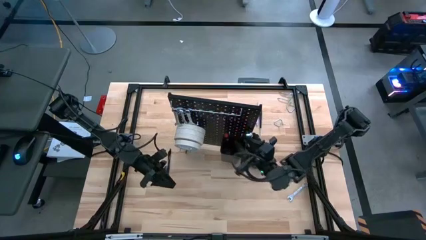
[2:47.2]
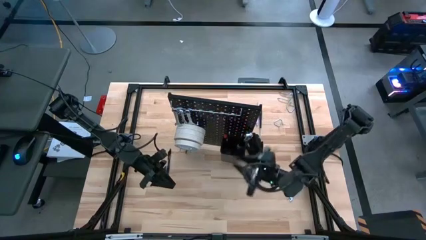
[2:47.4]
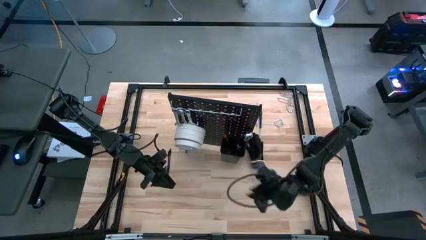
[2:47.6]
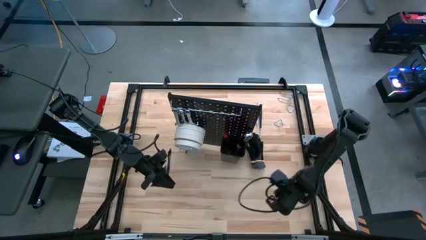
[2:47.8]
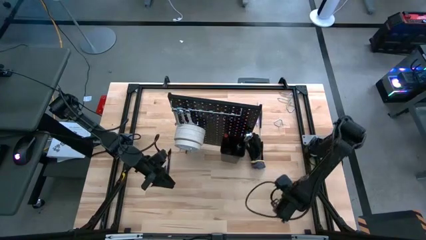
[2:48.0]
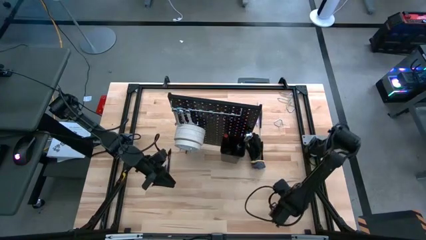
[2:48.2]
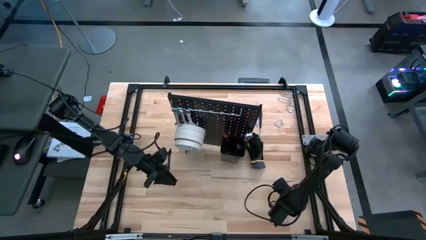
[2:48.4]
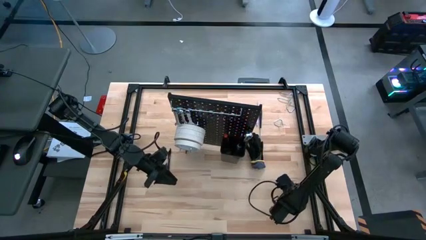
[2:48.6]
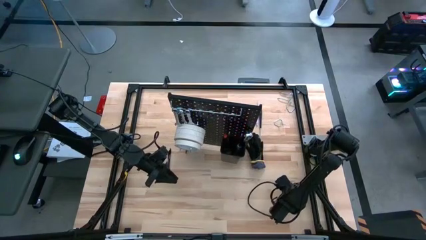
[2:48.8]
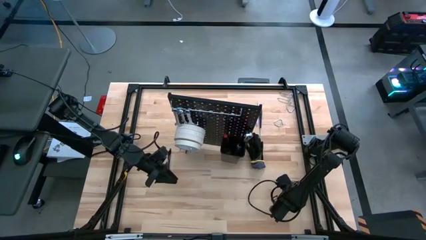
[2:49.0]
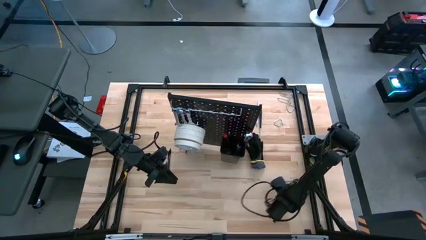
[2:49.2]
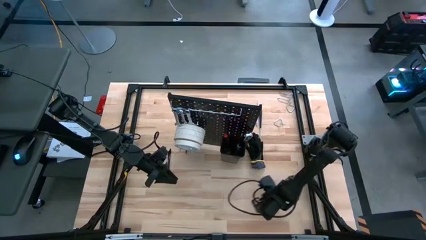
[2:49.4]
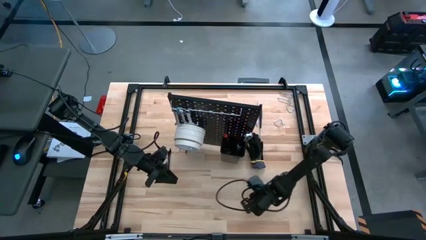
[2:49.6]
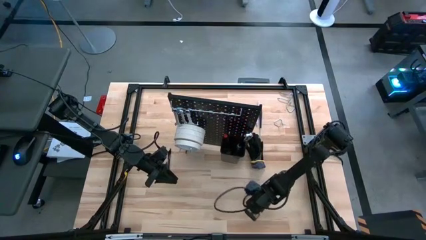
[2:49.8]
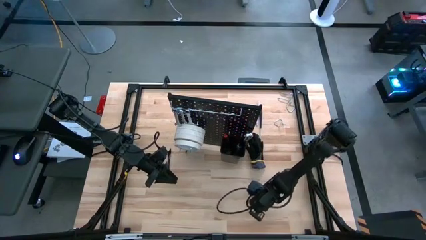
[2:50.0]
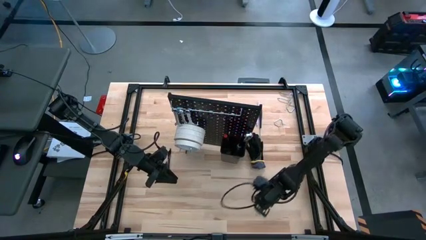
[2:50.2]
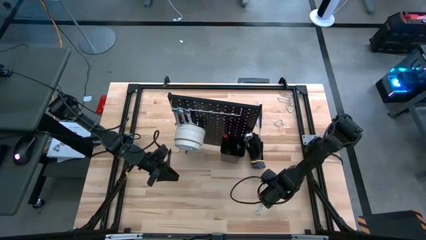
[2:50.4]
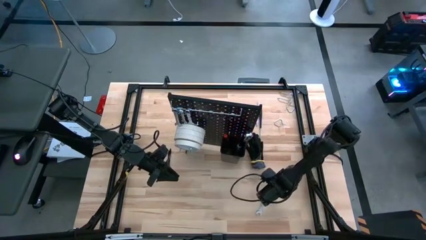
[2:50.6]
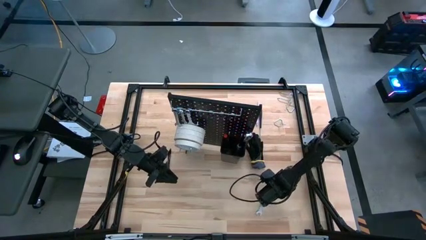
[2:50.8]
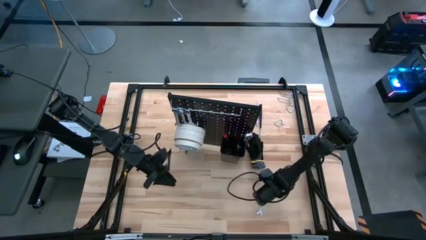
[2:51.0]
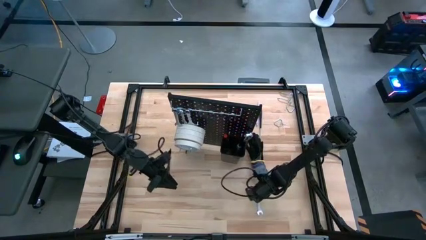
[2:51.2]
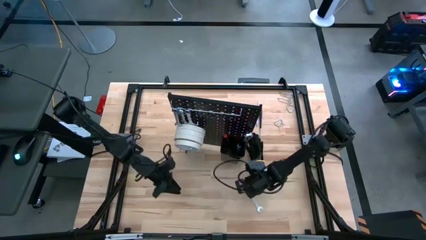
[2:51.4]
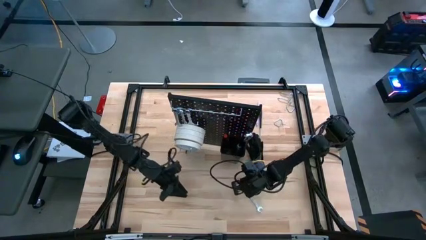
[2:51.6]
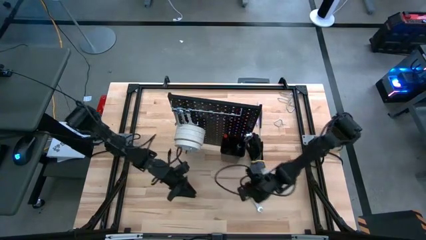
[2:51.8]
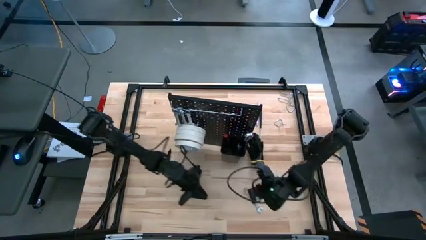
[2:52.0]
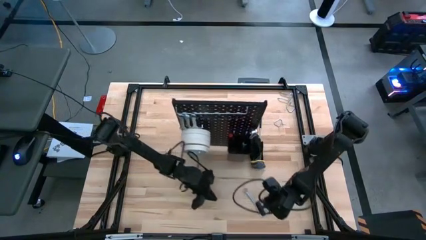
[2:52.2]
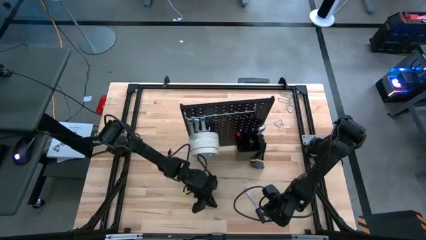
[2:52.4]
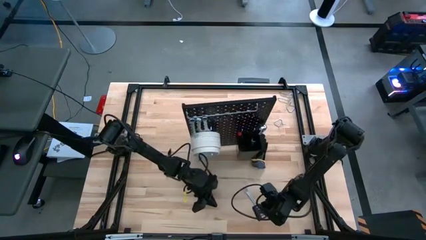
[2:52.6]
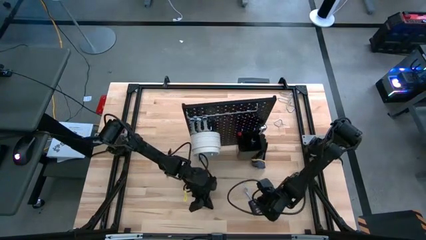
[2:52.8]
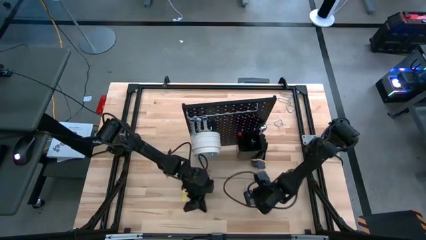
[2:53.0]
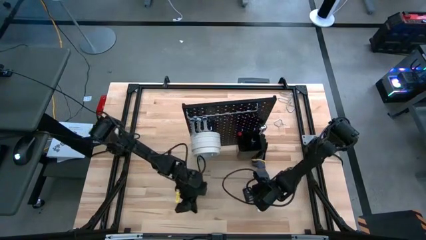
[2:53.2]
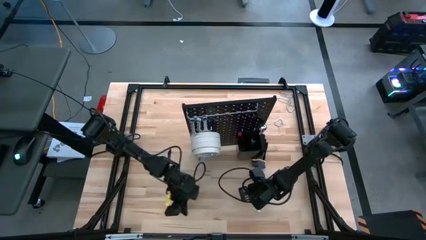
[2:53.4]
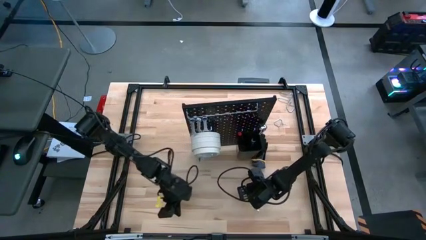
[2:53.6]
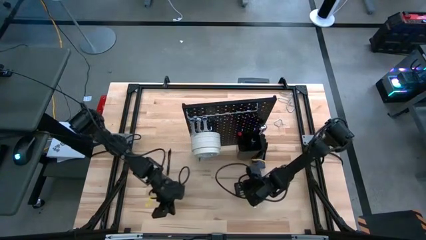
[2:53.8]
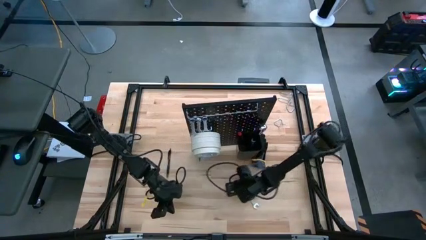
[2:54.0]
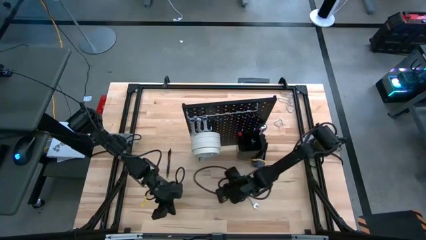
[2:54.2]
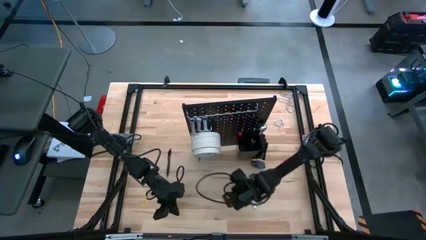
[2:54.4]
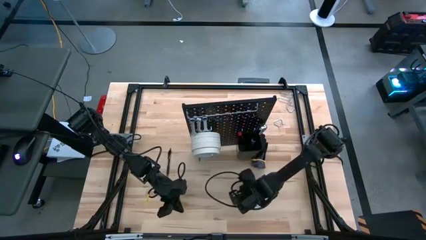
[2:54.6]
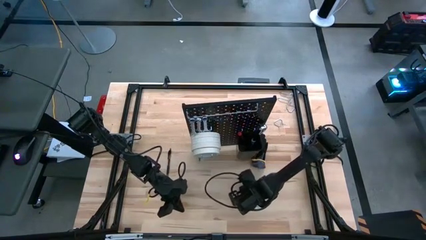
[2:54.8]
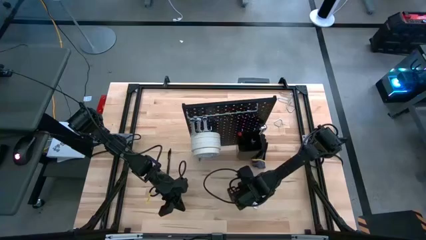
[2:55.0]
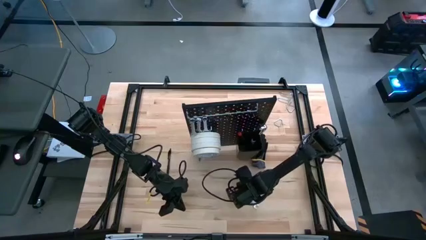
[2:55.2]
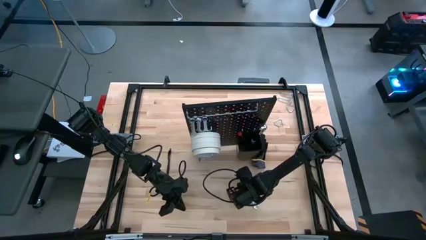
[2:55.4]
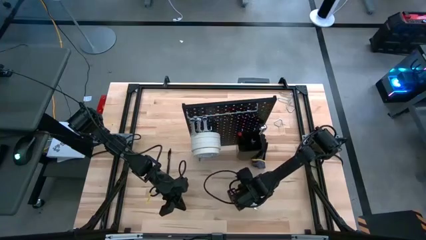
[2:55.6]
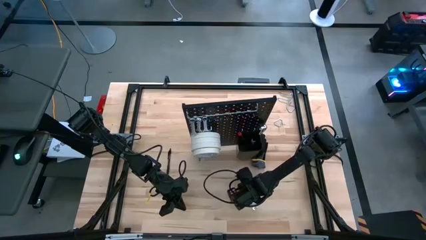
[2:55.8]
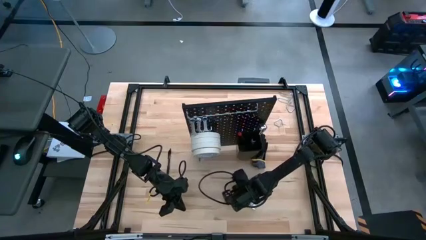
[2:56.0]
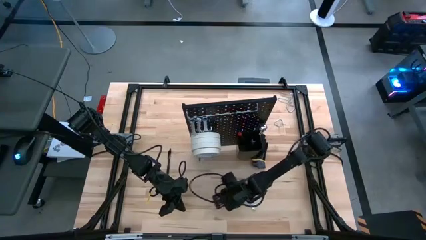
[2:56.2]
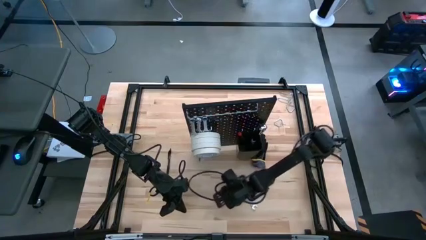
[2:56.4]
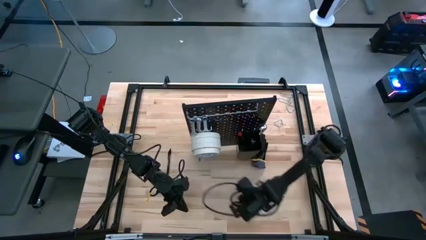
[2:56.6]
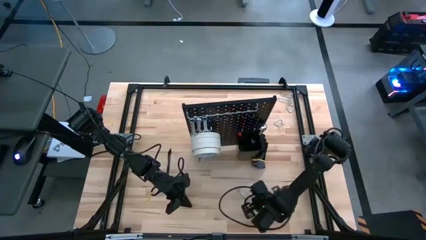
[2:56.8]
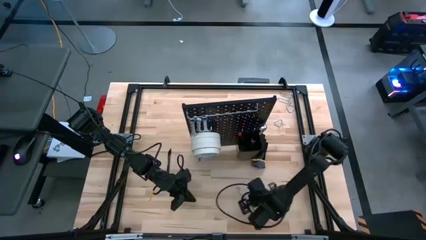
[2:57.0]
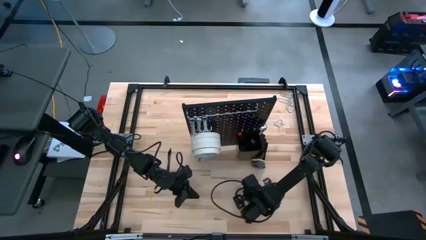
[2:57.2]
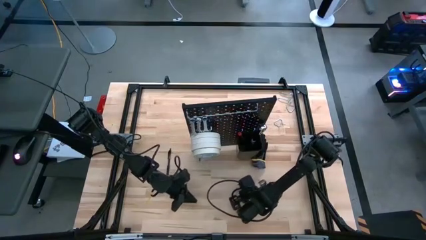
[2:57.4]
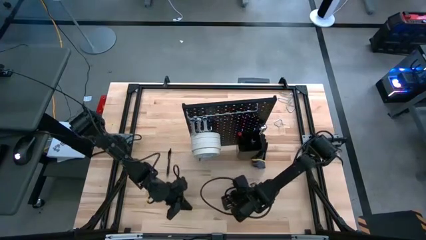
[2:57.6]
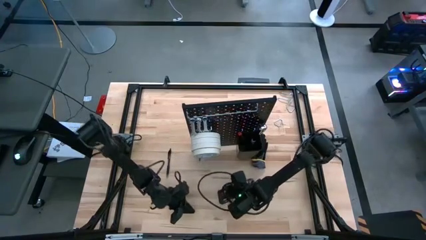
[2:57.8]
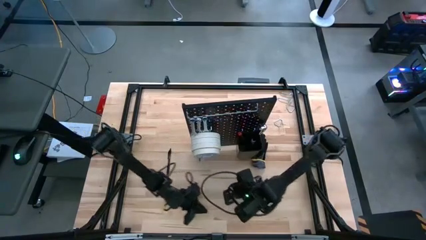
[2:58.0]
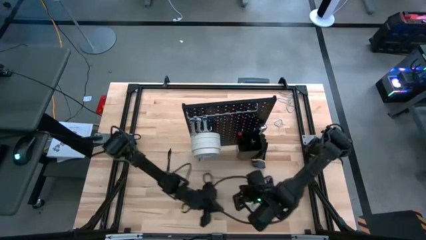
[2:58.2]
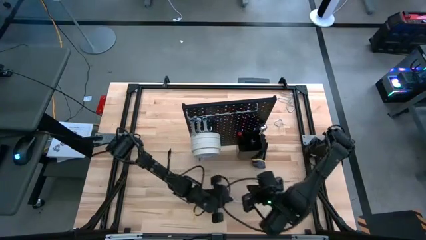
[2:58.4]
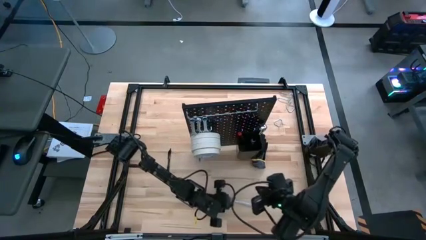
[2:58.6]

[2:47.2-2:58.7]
Task: Hang tools onto peg board
Hang the 12 mm tool onto the pegboard aligned with the others
